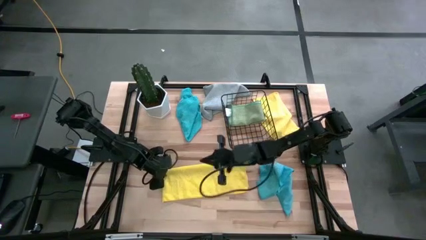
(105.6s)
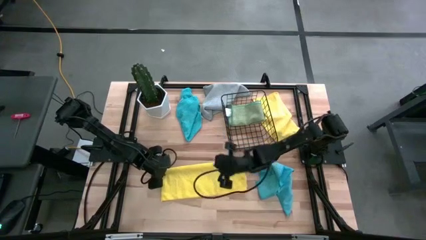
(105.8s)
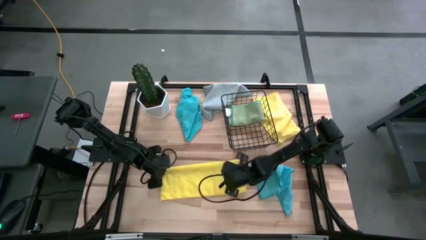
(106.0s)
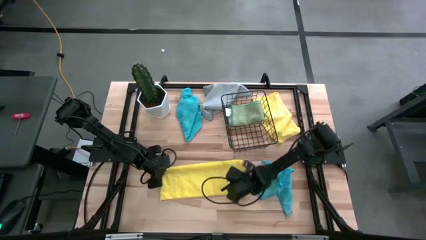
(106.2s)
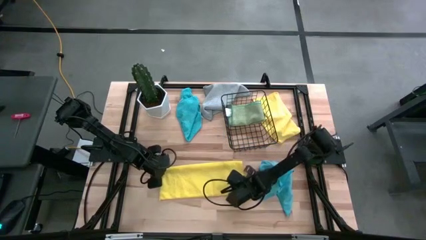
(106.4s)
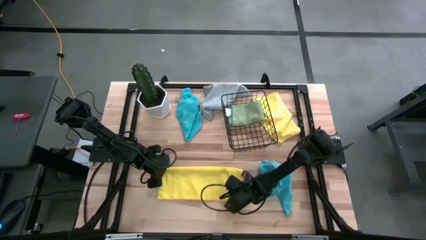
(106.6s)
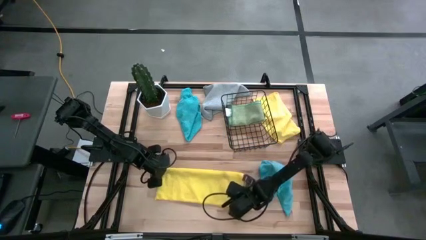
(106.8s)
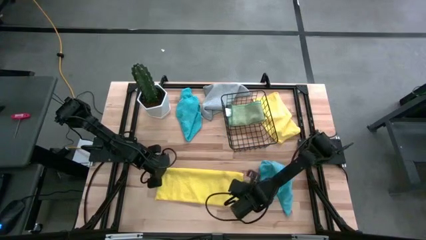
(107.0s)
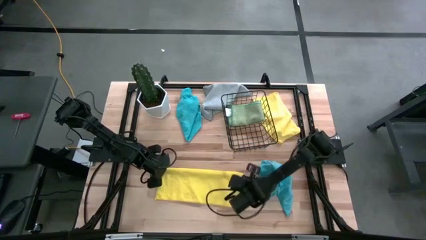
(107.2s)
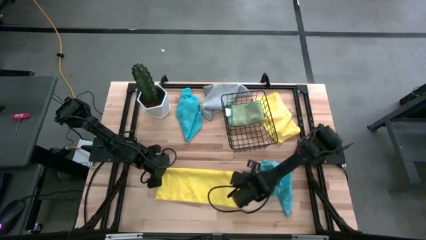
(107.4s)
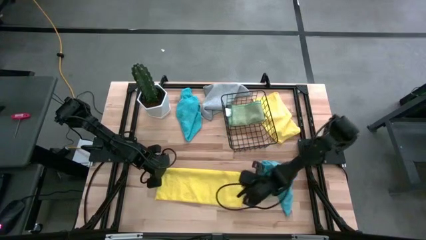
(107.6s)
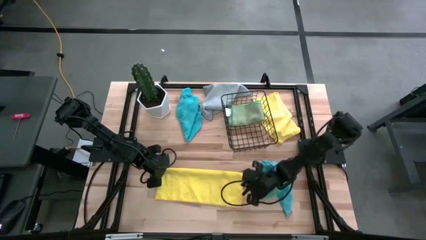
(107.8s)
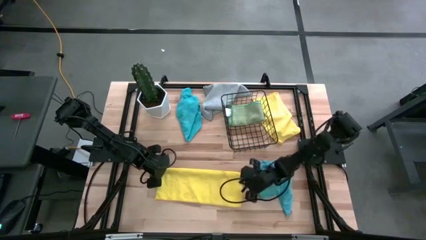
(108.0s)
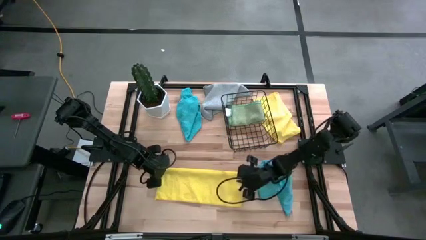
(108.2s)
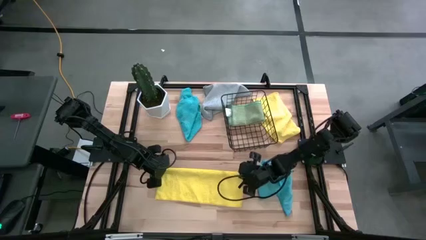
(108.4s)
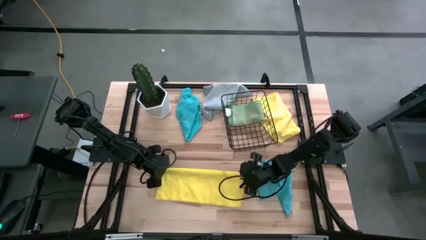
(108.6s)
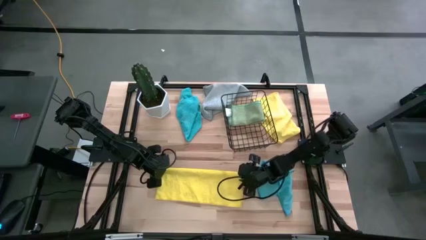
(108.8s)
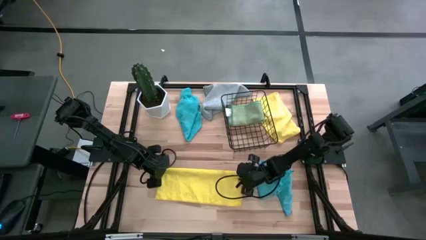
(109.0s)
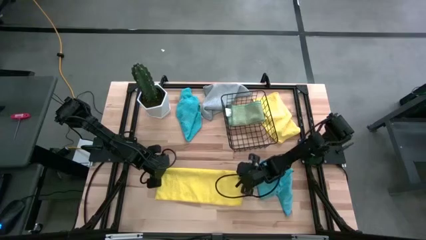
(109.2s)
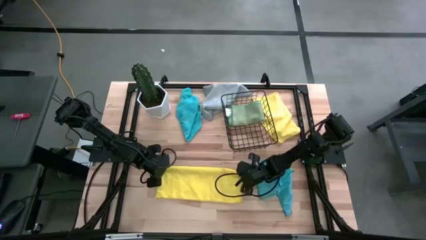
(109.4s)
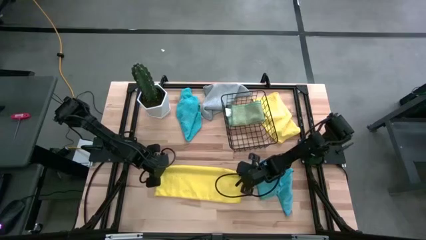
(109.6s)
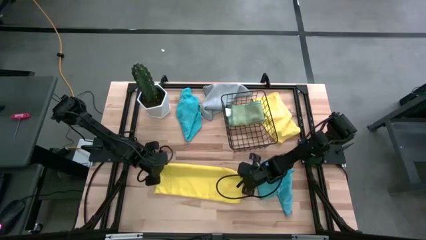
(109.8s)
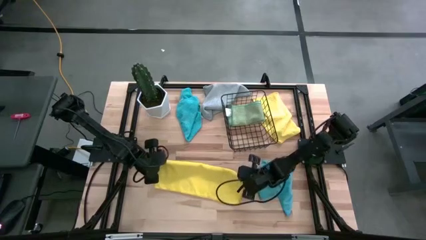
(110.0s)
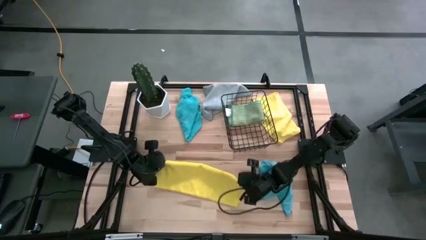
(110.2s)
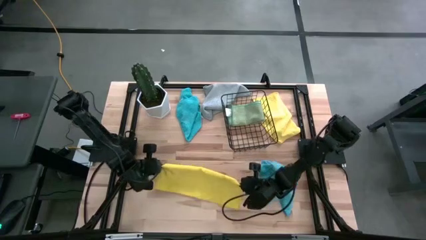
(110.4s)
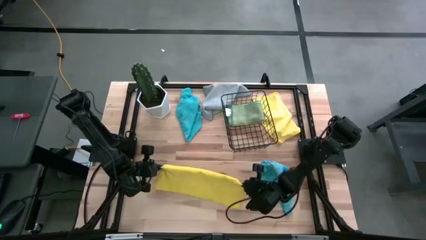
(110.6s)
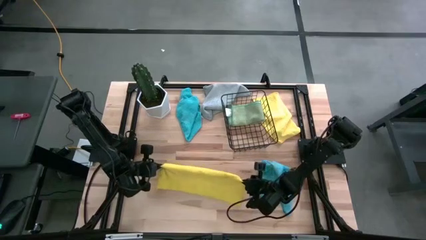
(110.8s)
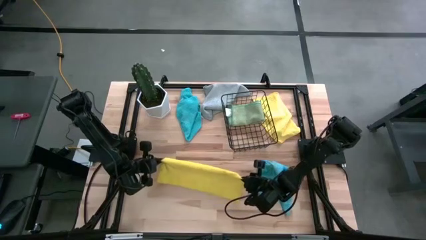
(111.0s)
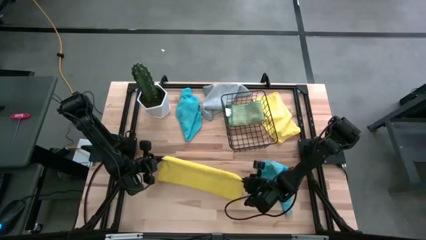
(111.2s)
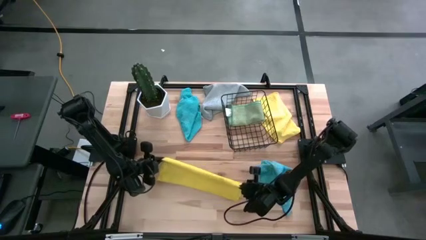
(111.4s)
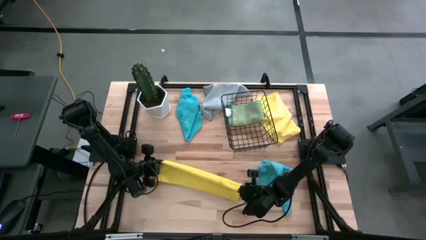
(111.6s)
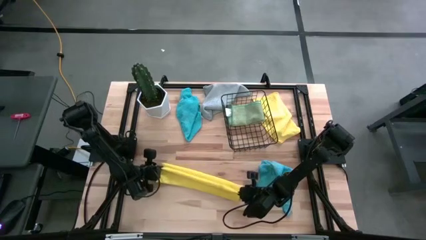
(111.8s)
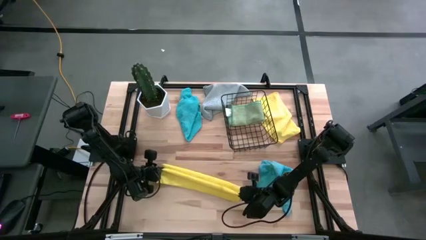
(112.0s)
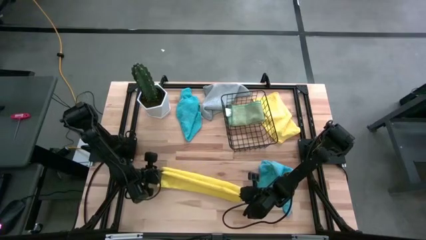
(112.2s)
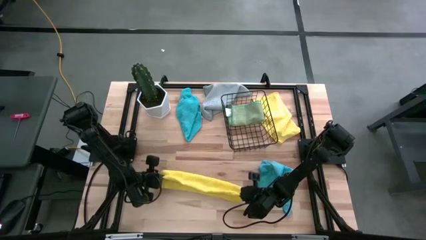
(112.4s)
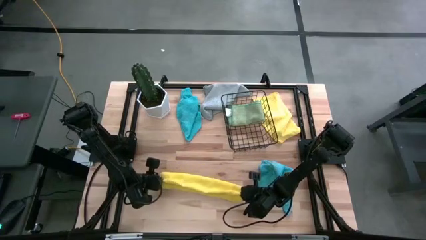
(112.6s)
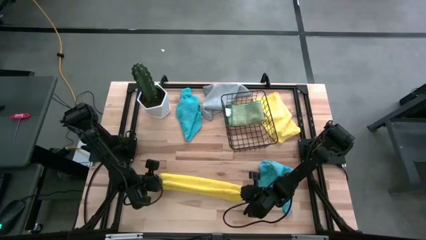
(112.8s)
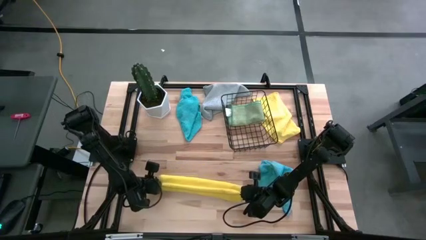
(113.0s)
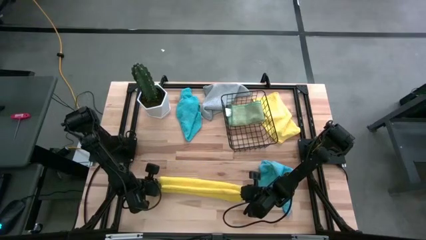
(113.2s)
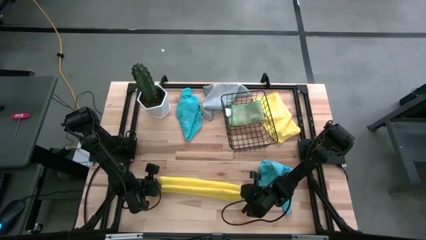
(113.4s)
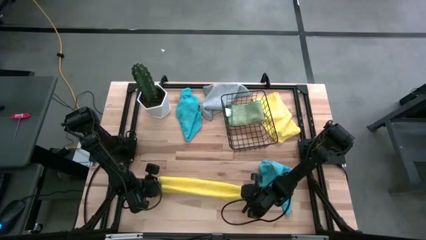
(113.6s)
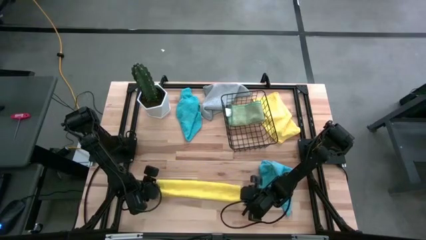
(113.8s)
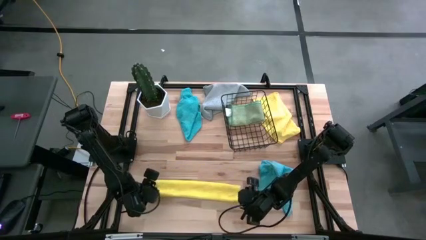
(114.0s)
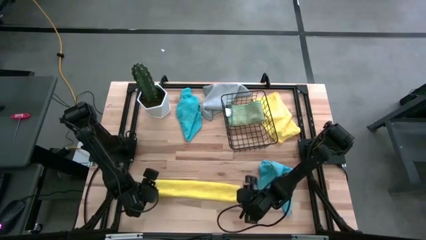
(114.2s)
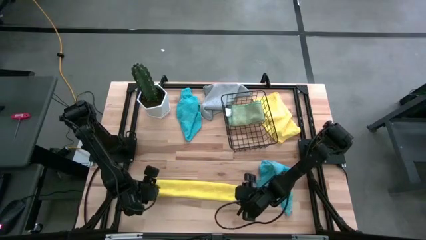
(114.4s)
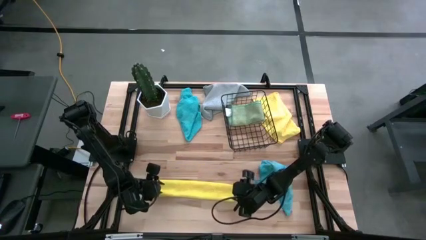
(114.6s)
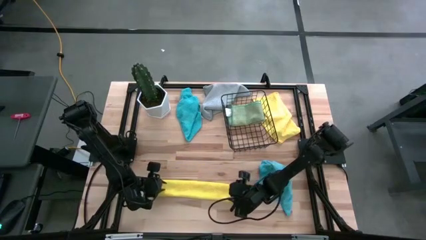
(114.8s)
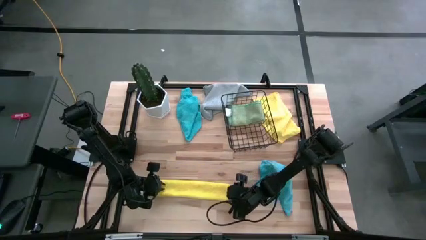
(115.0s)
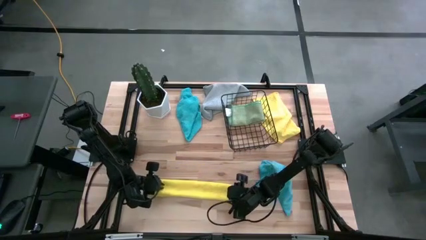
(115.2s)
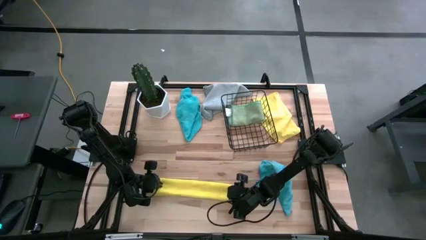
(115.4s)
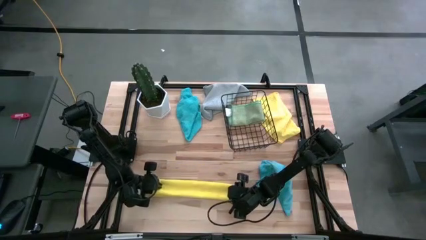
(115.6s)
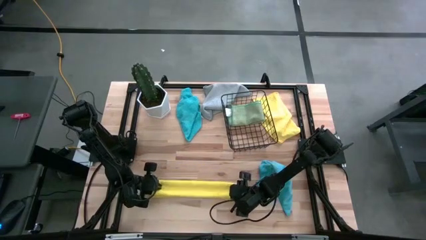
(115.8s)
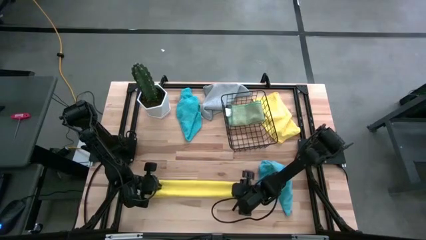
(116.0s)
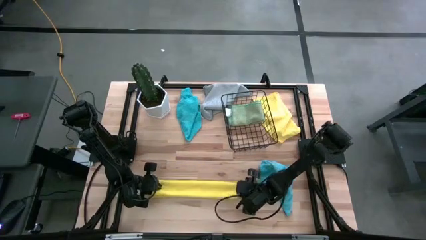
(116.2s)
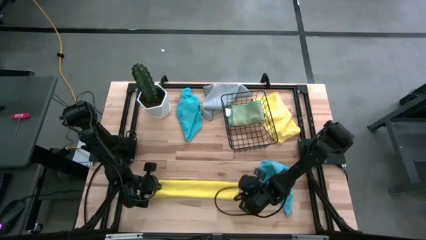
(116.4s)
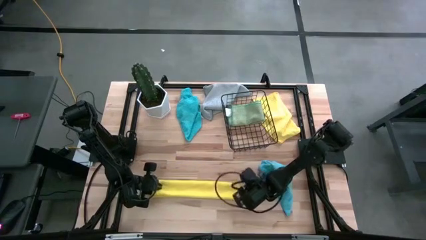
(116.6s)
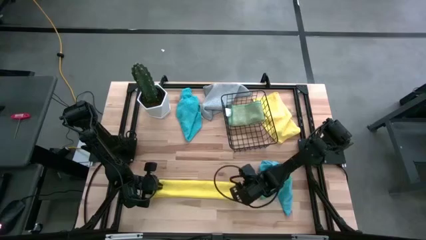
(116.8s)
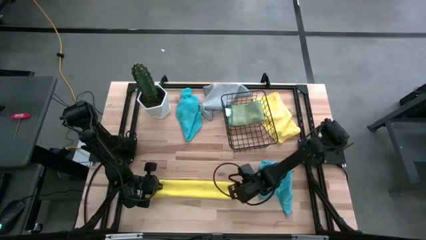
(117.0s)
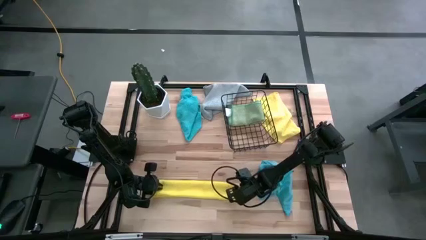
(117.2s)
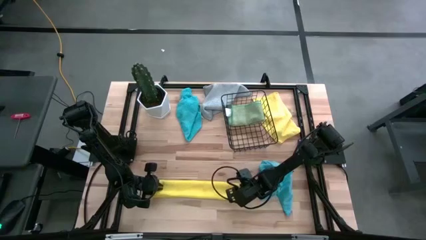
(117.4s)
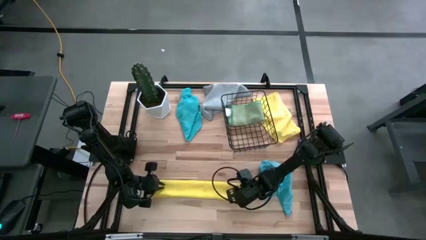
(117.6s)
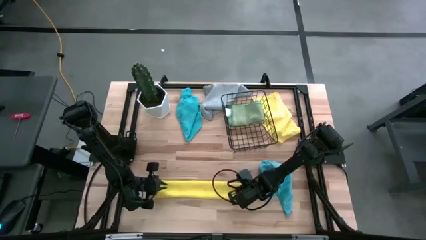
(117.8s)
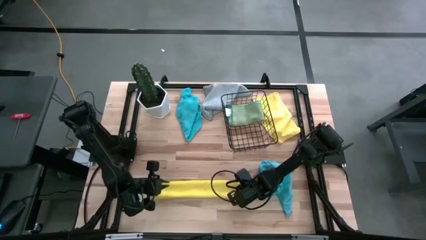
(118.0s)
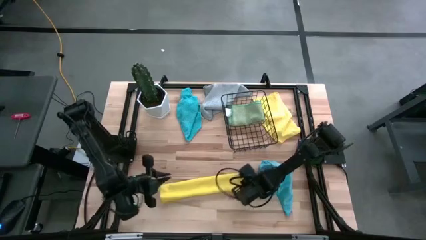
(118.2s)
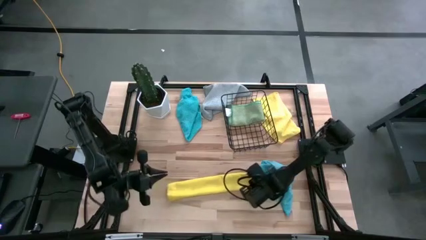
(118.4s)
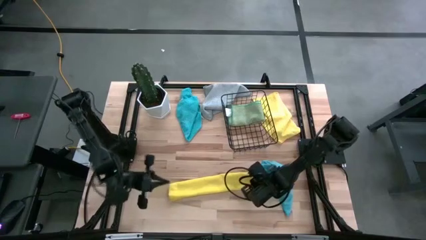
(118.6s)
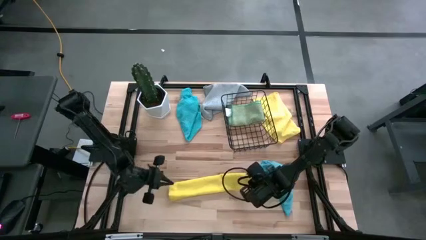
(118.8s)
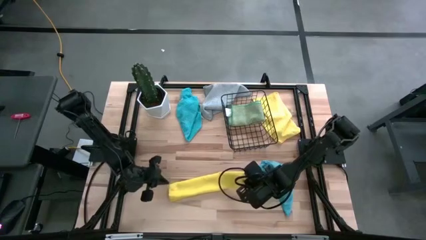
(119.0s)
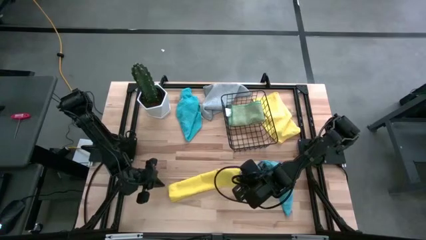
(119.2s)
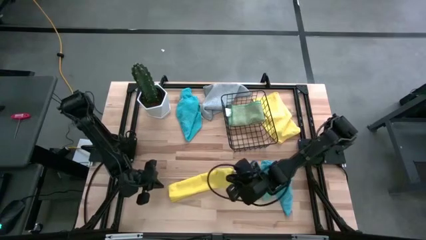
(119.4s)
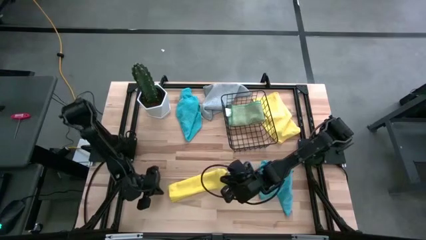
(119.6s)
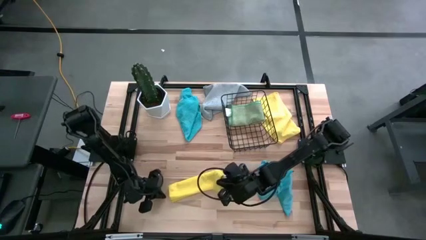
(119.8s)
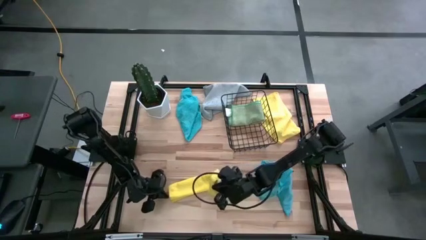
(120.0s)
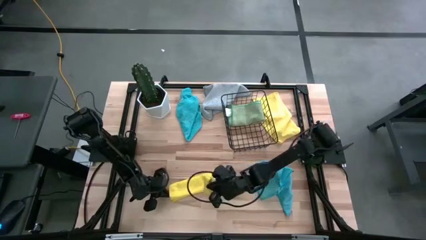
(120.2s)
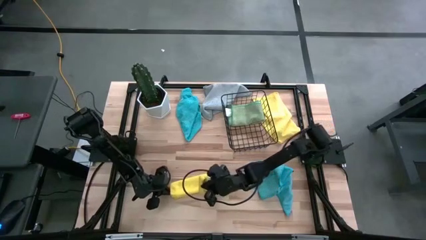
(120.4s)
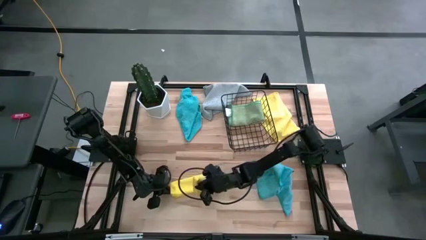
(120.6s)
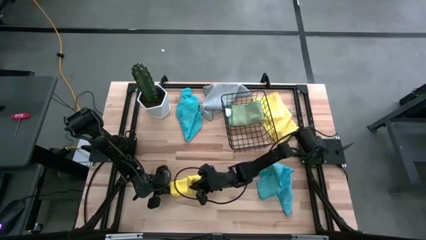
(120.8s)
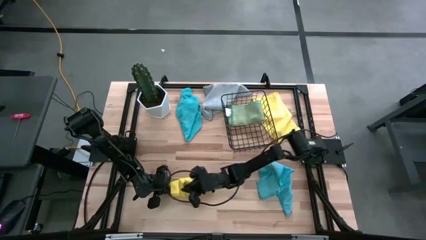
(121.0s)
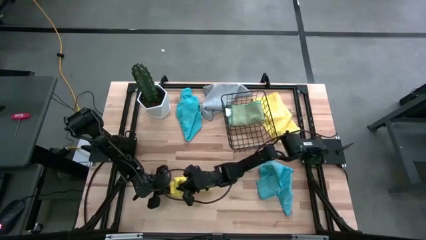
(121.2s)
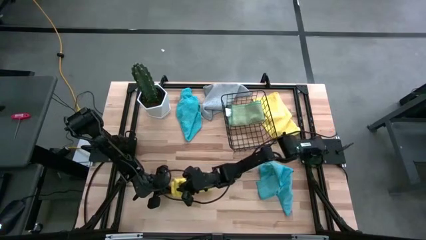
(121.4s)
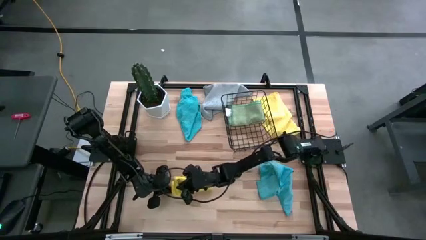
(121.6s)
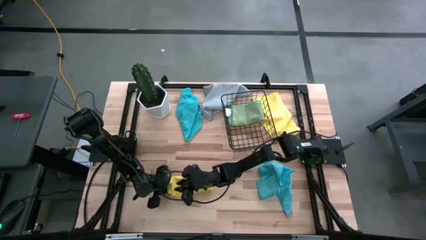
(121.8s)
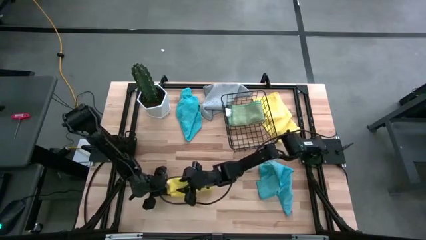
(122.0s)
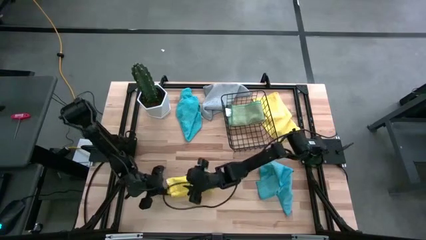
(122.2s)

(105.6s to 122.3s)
Task: Fold microfiber towels
Fold the bottom yellow microfiber towel
